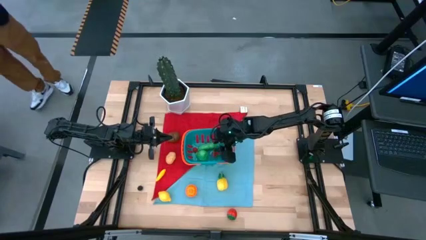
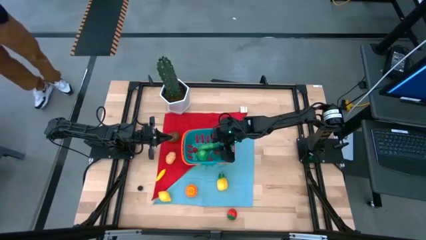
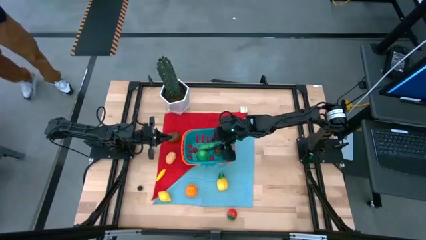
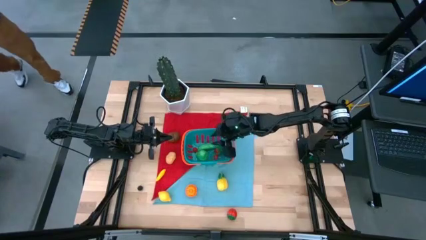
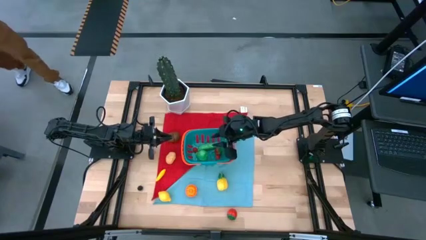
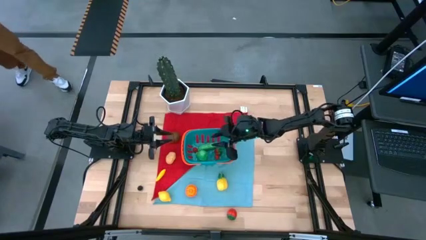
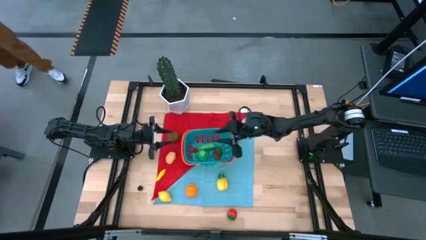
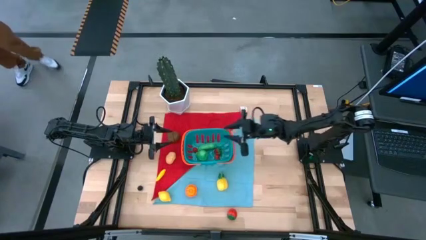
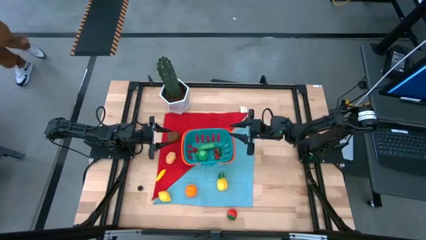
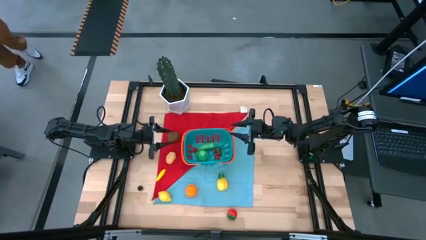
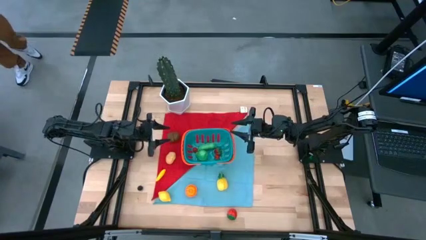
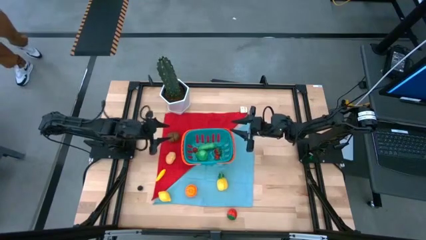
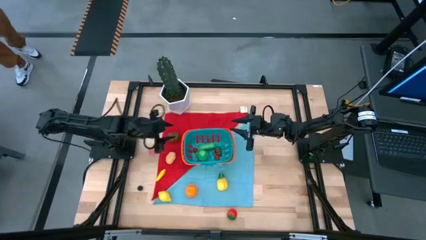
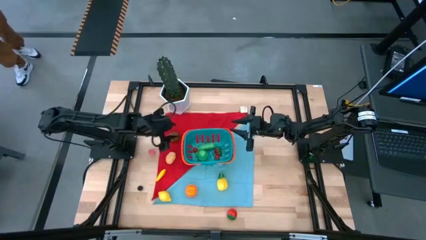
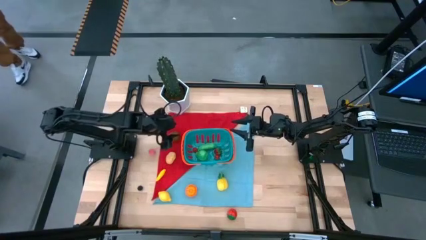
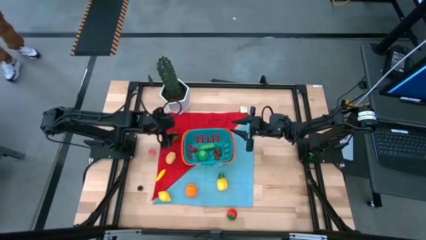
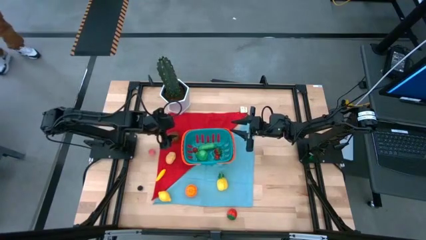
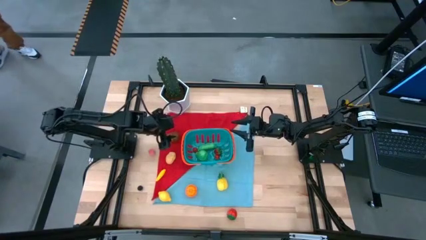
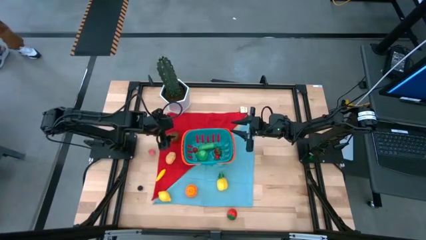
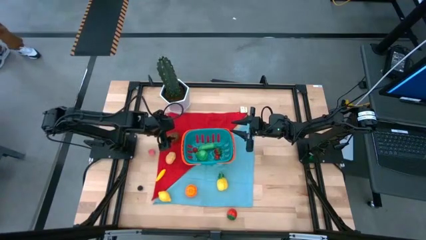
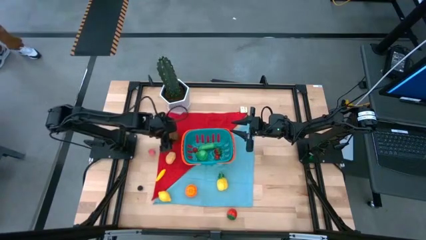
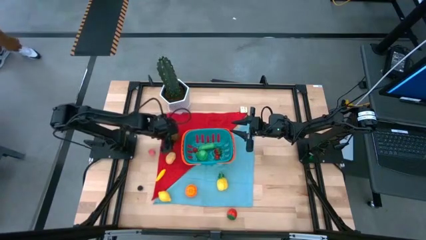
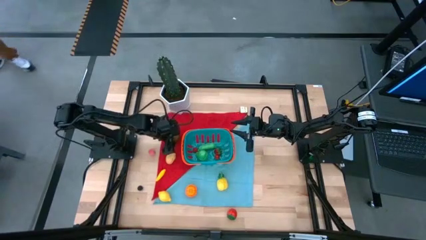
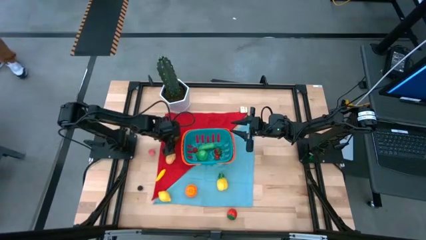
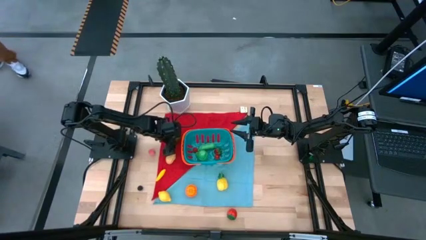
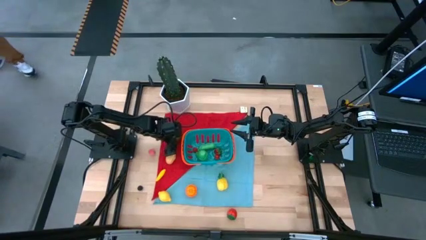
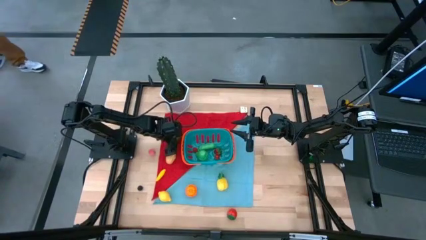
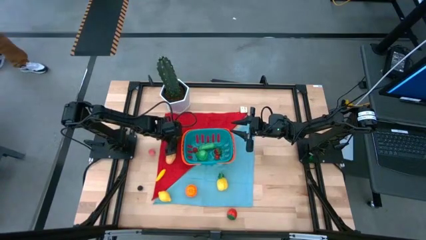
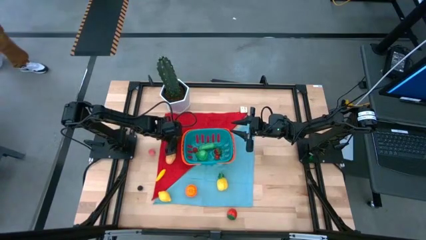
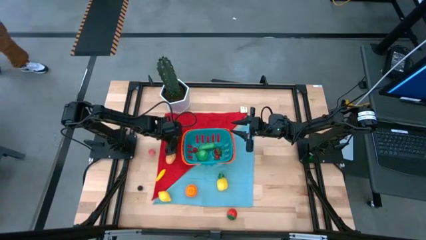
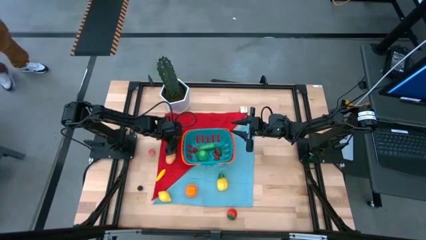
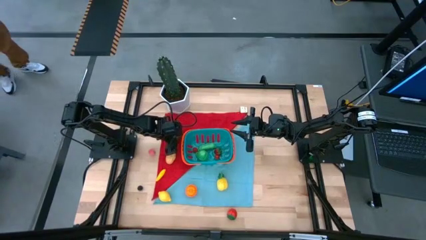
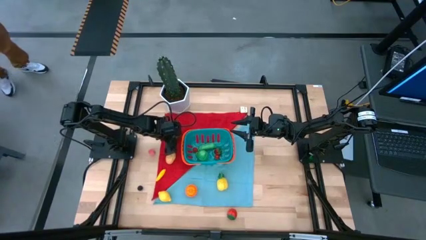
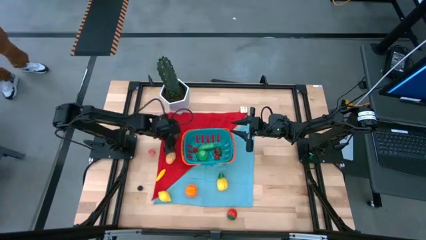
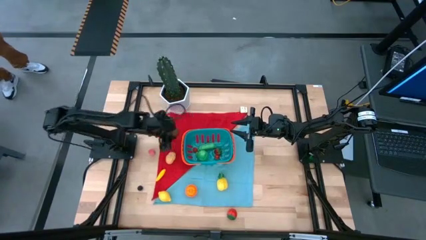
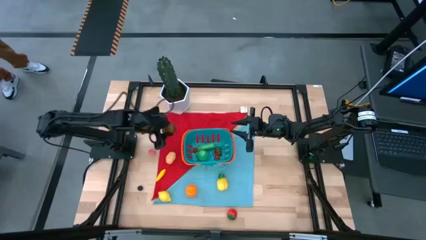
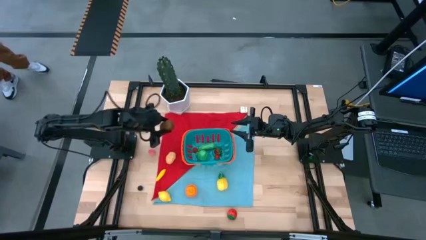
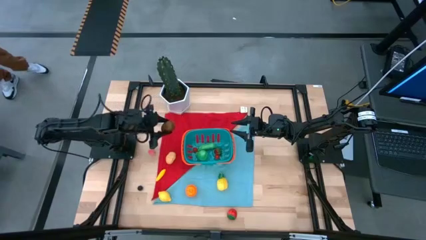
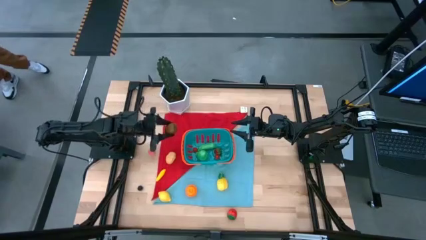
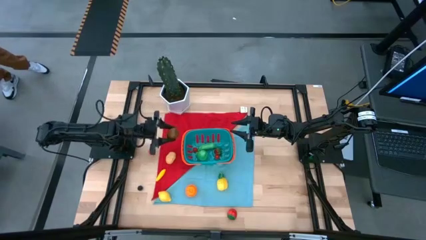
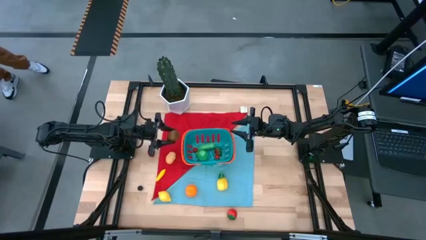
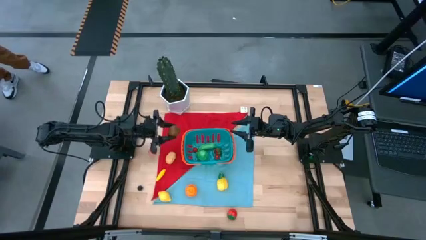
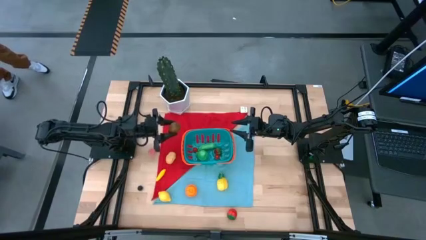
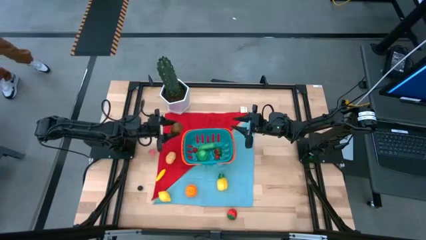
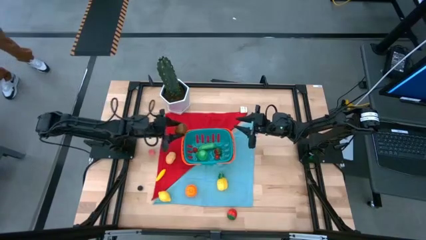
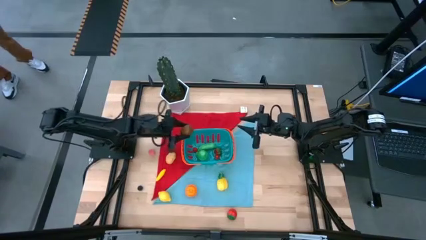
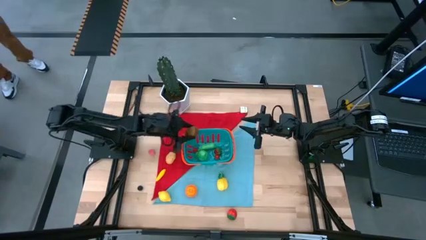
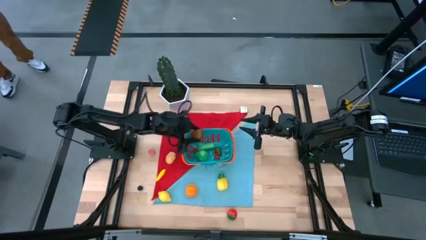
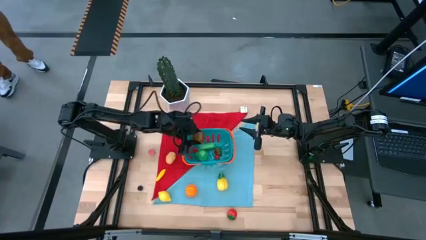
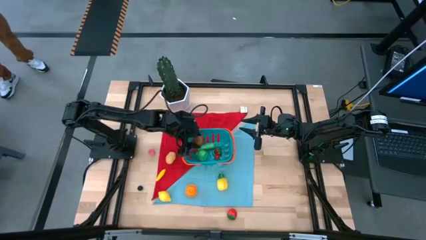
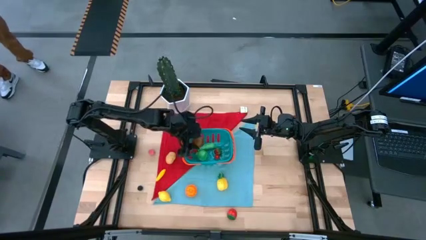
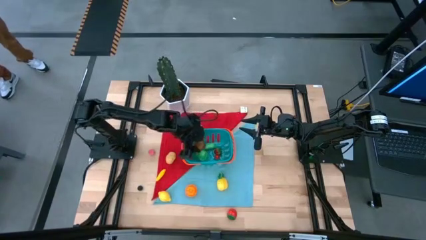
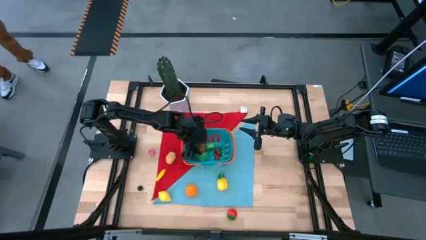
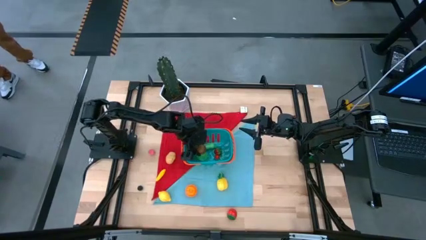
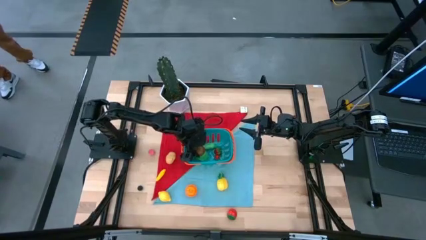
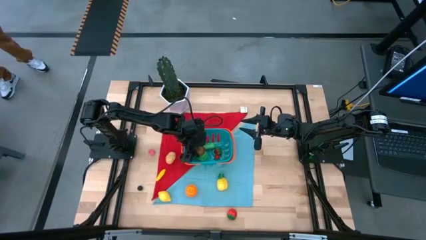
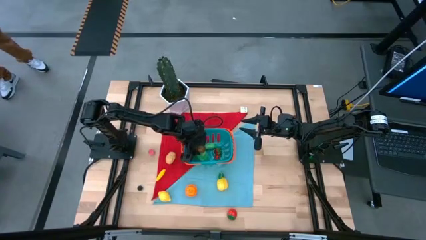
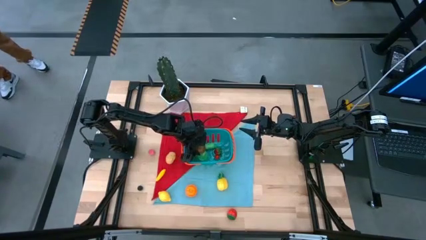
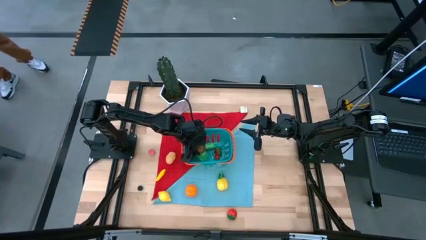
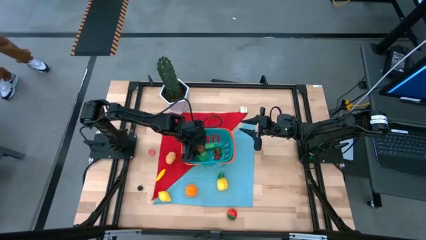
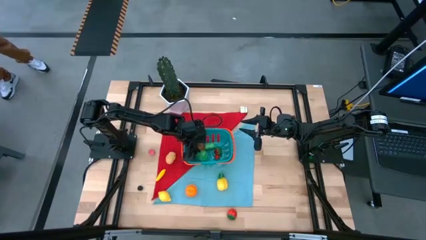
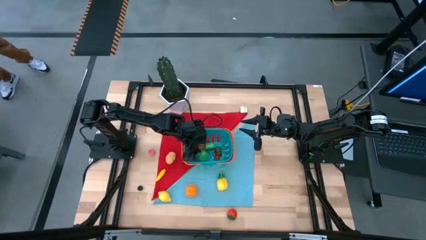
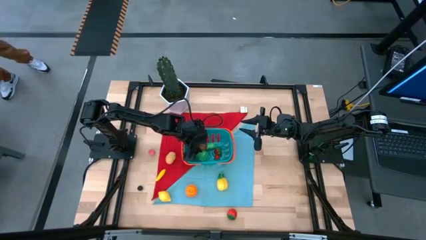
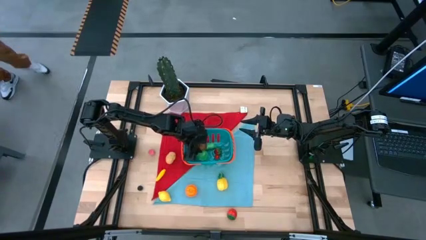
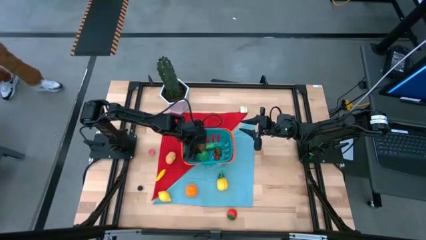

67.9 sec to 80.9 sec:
Task: Build produce basket
Put the brown kiwi into the blue basket
